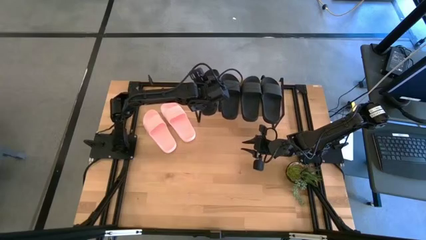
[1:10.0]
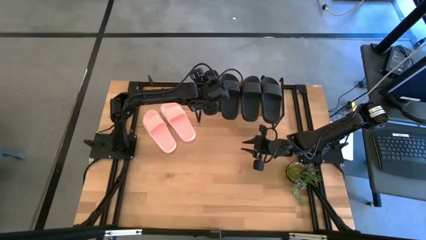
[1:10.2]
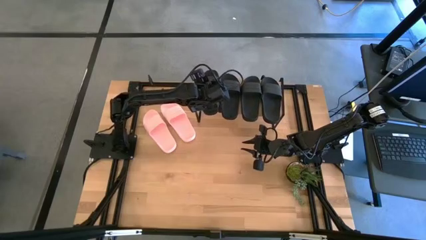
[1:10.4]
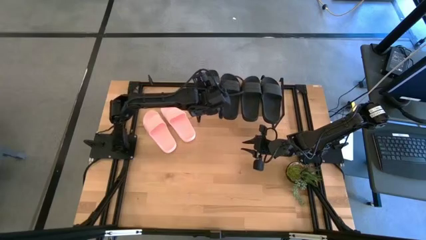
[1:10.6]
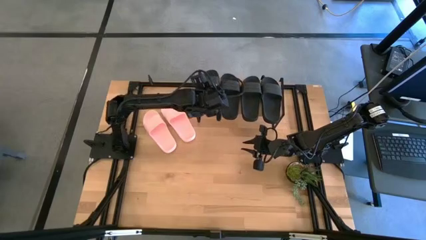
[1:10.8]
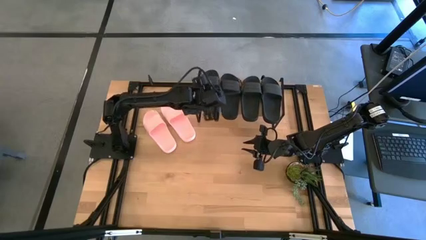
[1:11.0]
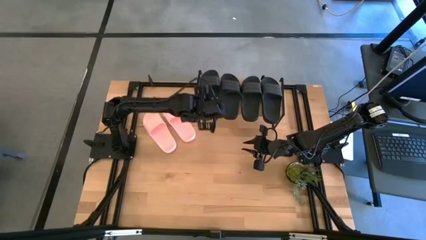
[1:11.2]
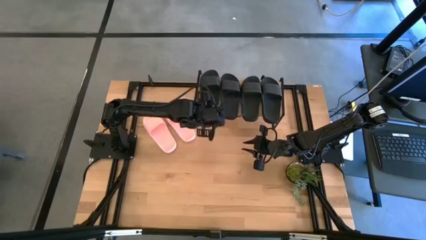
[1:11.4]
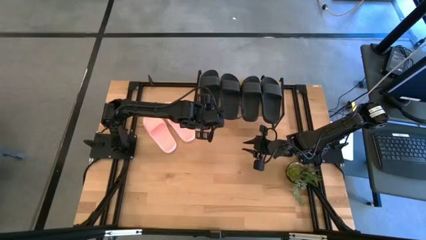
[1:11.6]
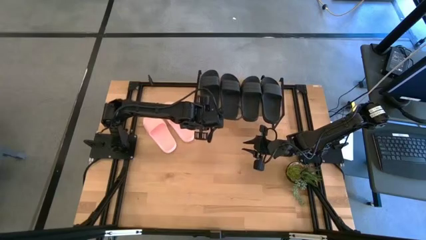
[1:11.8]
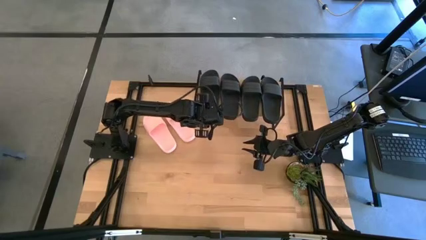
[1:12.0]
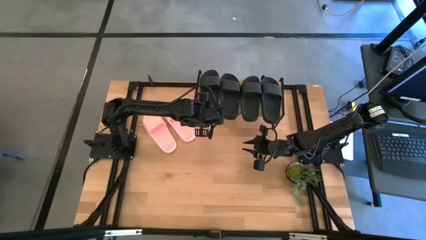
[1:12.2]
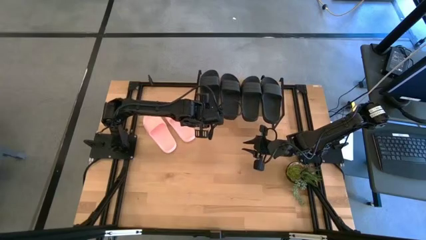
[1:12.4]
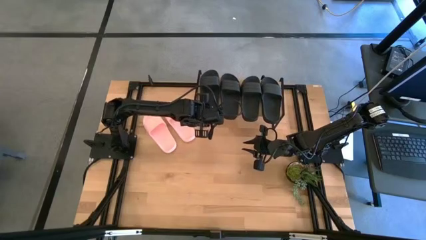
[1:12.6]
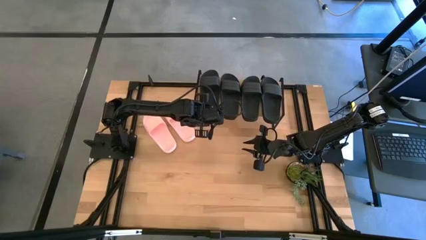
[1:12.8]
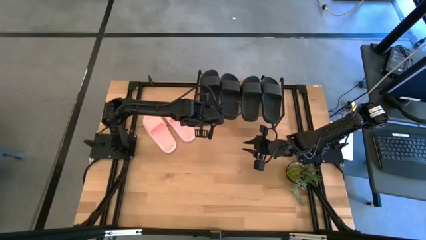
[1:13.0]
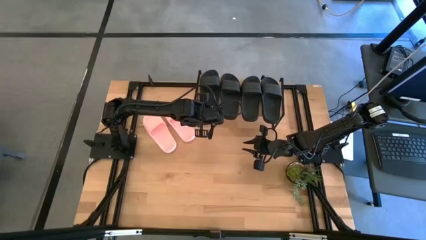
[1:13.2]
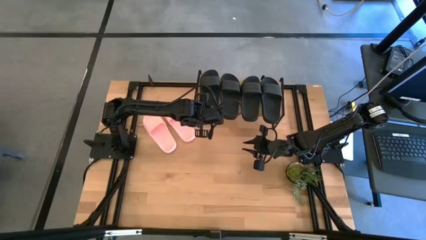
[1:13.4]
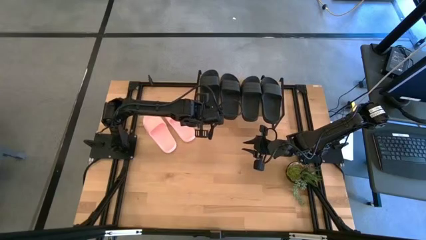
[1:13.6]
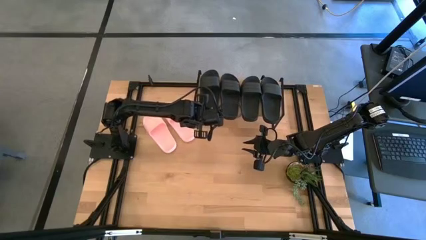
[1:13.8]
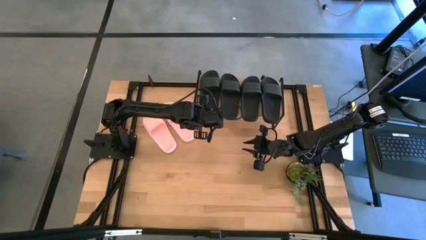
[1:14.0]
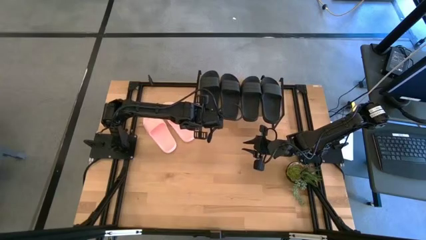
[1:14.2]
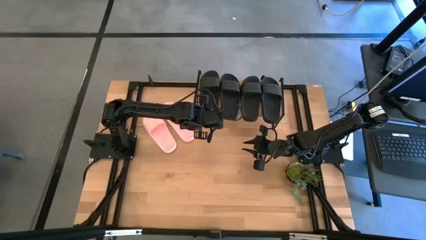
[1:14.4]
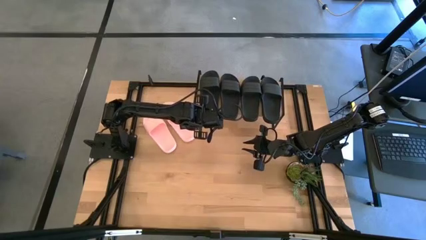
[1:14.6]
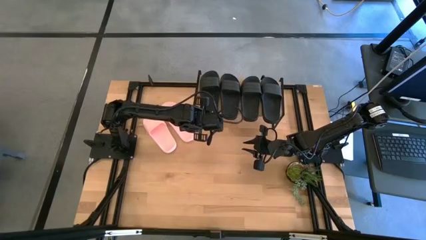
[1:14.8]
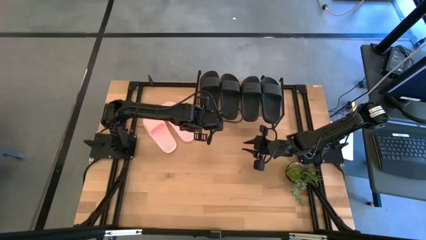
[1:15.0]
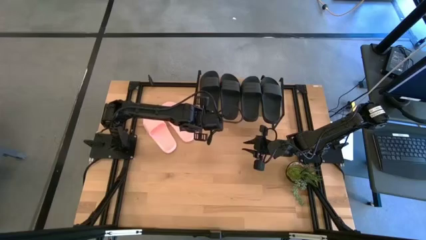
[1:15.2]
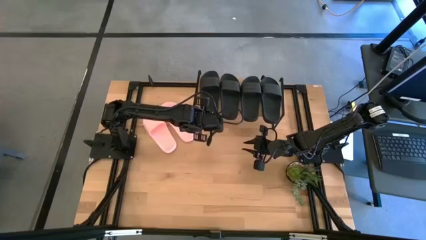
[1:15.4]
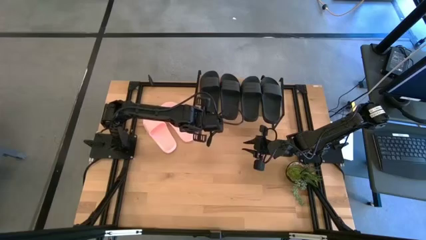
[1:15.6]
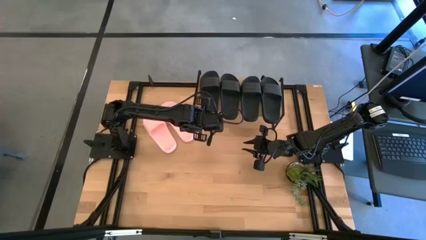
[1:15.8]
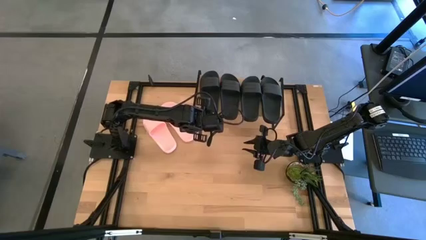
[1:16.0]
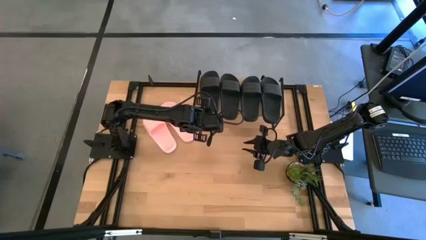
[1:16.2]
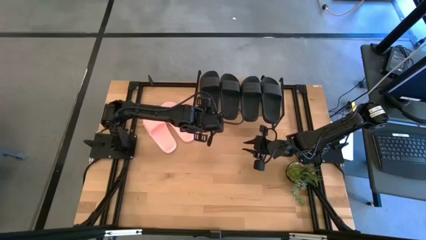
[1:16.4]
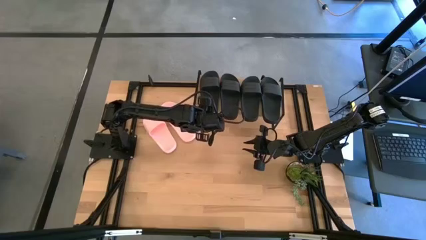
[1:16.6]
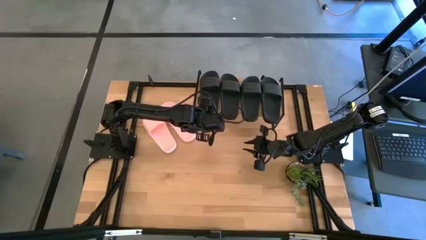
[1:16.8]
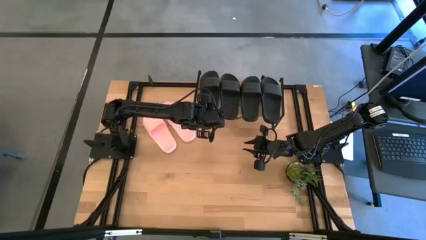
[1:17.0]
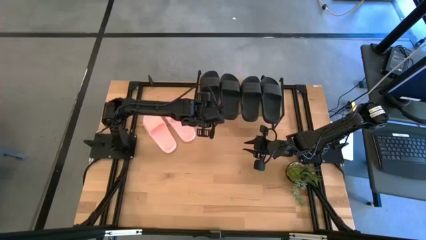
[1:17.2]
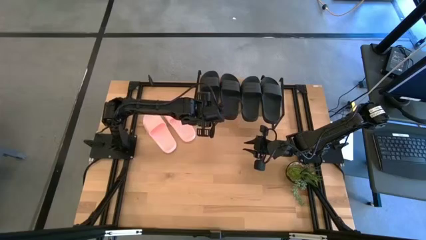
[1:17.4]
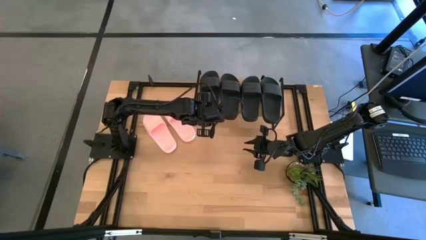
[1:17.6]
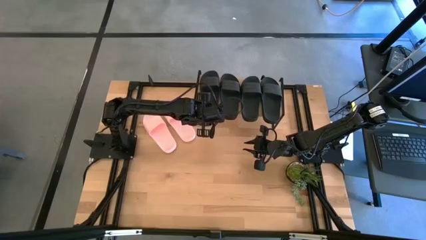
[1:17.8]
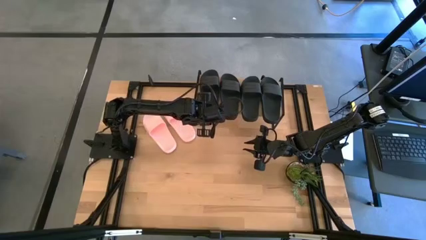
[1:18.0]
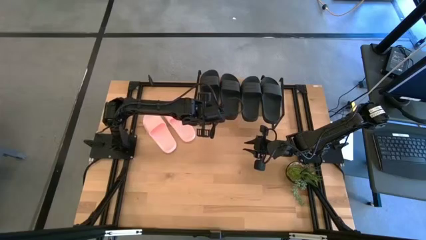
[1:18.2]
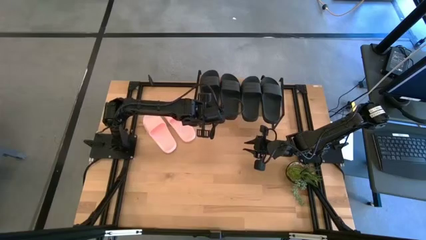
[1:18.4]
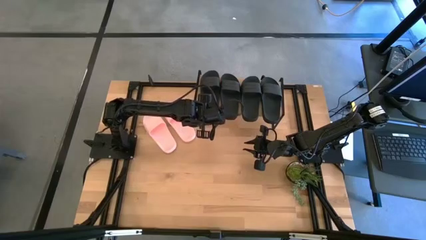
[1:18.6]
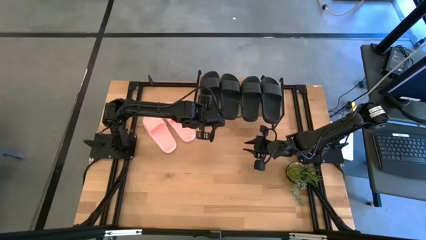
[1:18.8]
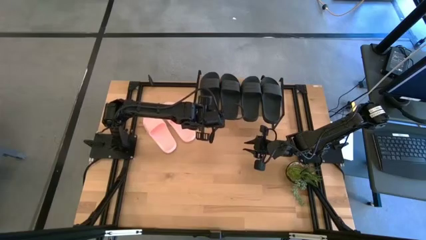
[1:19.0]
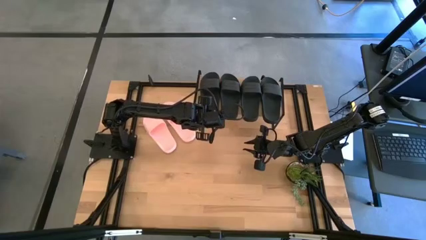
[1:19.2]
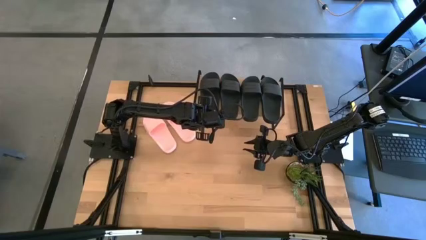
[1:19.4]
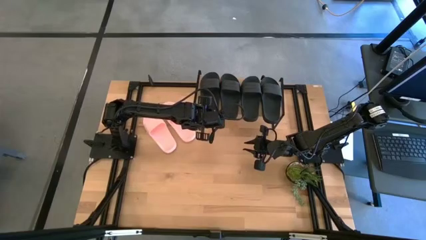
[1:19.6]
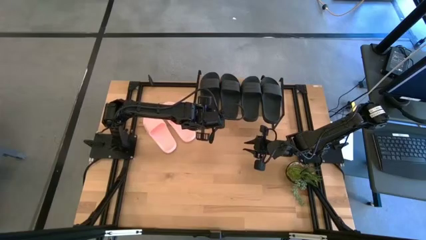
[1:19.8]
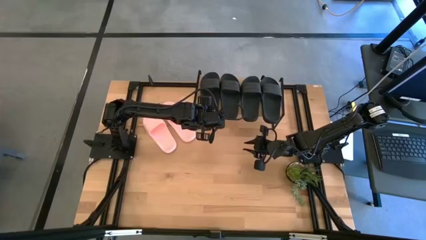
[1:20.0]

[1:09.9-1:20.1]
Task: Pick and place slides into the shelf
Put the black slide on the shelf

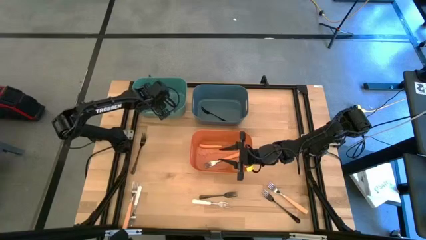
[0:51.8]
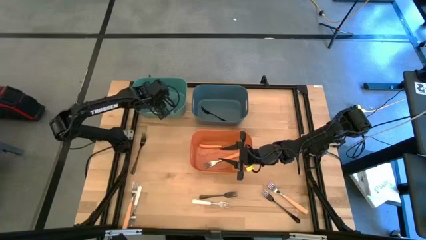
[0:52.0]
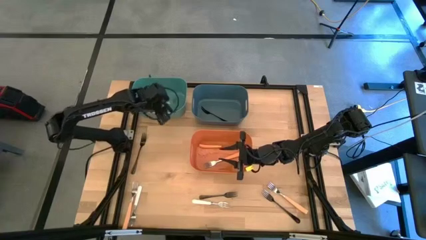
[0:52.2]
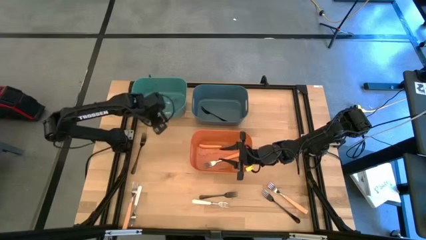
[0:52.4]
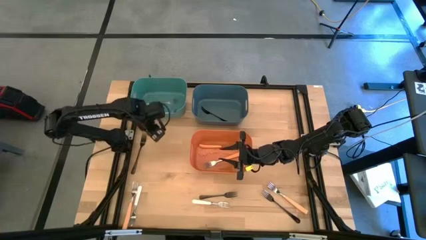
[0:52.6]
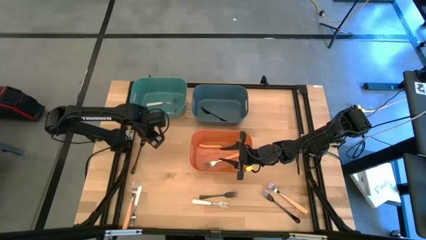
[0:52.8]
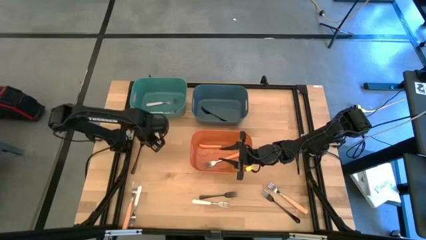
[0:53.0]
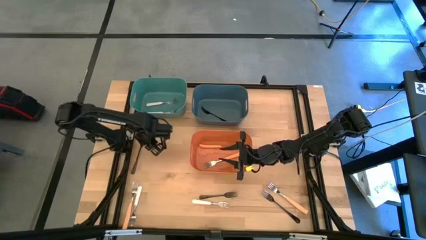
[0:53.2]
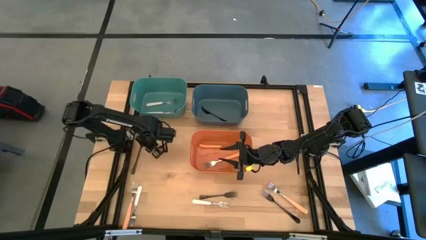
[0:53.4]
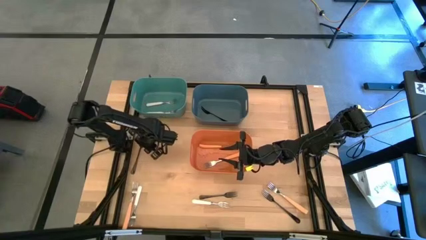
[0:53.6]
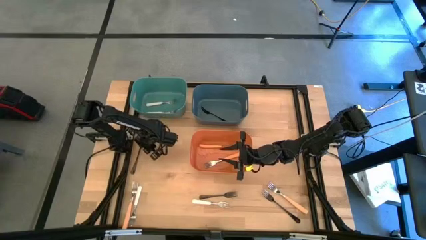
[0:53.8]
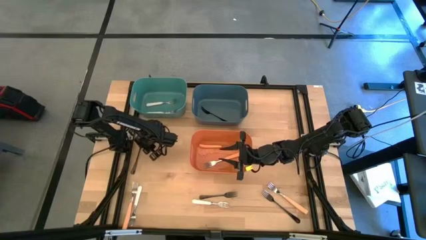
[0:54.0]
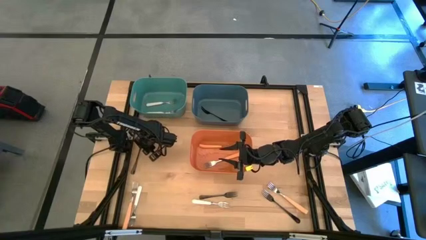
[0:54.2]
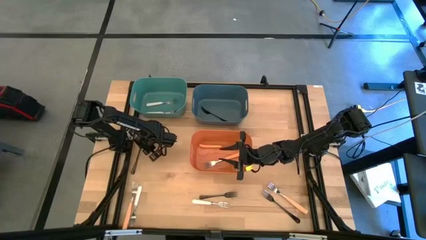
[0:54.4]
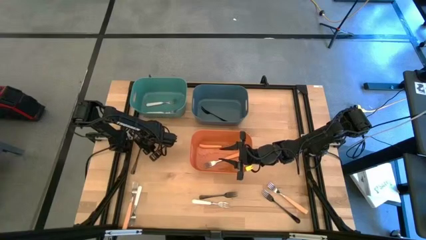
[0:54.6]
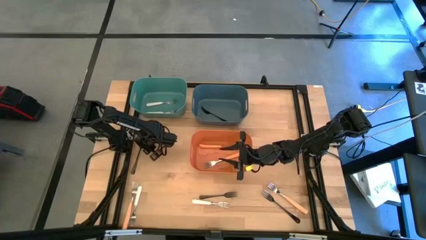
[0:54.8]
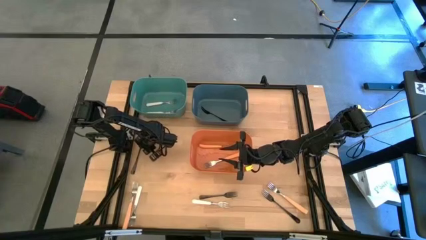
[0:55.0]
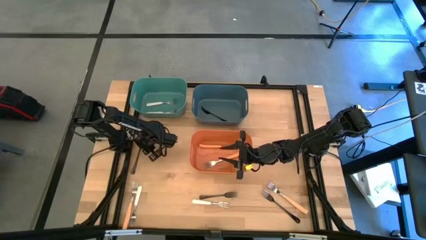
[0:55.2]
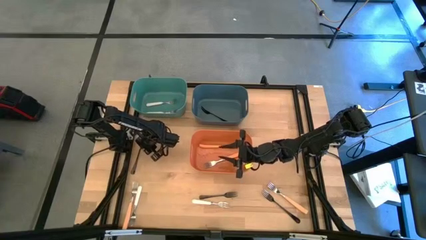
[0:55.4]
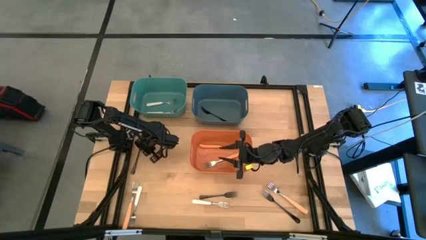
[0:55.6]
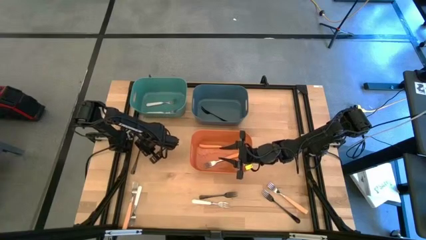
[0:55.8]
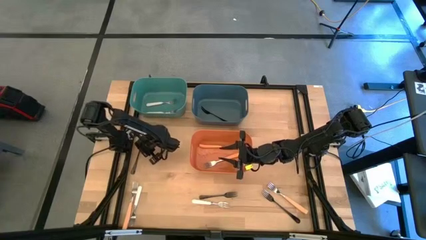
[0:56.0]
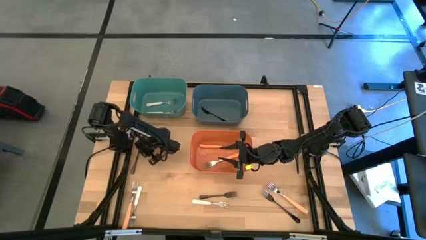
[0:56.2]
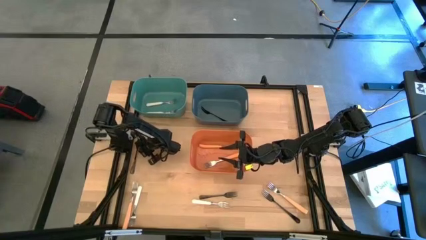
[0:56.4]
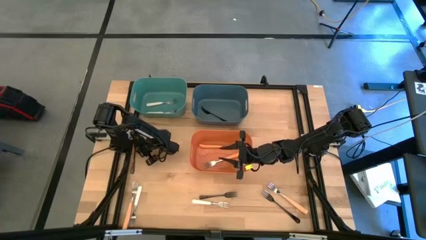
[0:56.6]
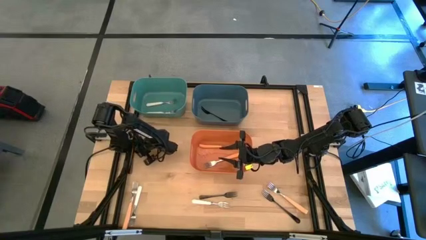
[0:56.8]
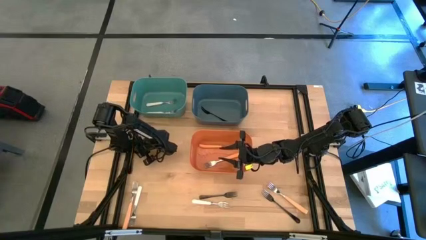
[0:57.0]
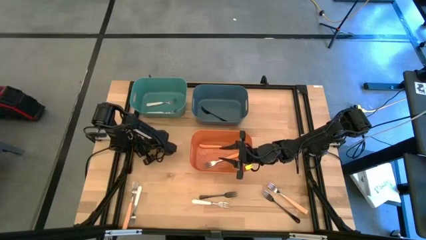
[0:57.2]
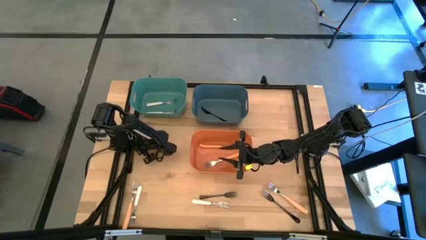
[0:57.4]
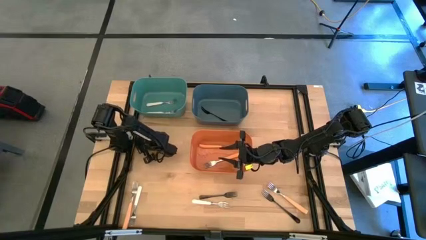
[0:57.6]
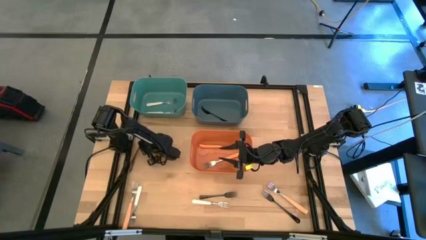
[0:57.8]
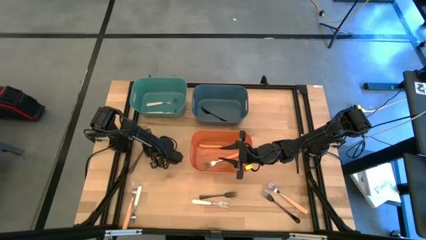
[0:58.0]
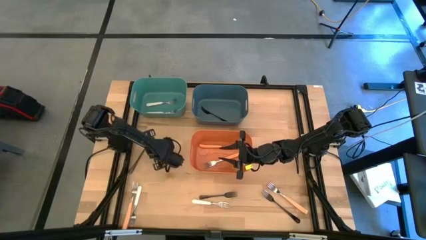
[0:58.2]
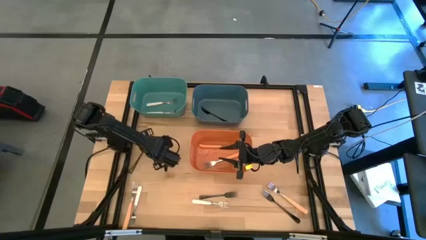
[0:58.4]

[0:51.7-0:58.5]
Task: Sort silverware by color (type)
Put the black fork into the blue bin
